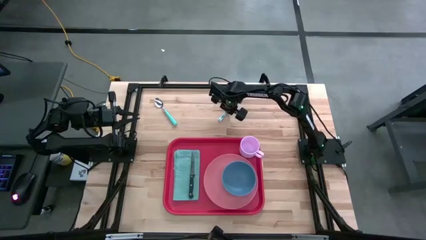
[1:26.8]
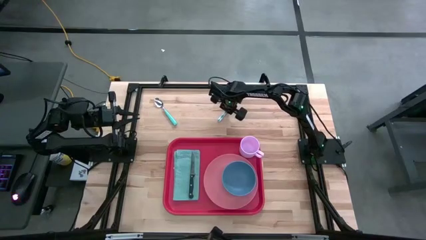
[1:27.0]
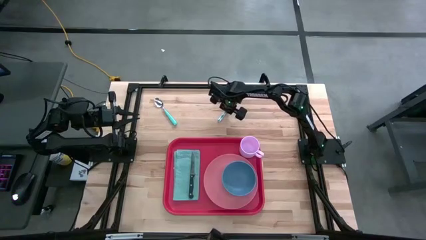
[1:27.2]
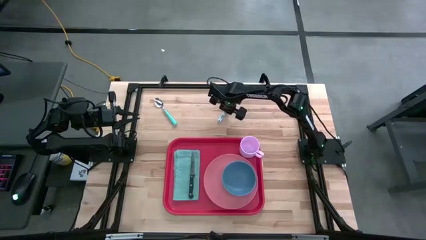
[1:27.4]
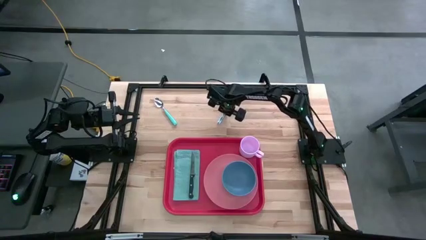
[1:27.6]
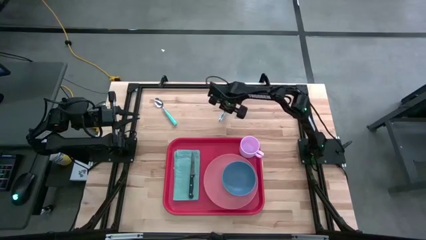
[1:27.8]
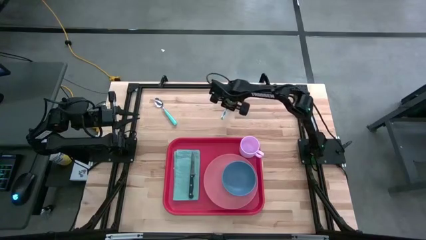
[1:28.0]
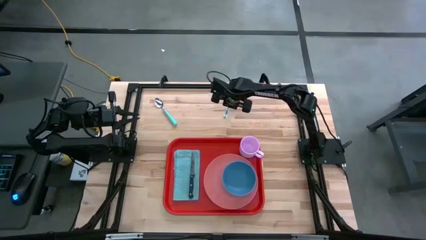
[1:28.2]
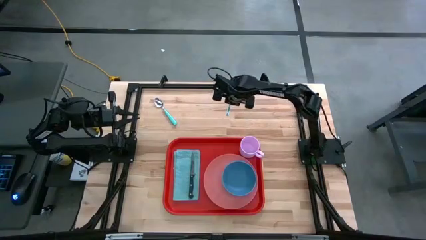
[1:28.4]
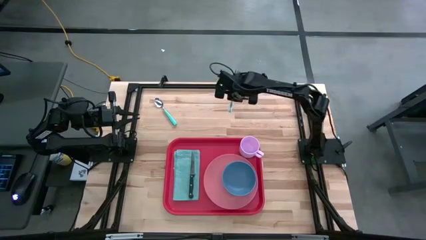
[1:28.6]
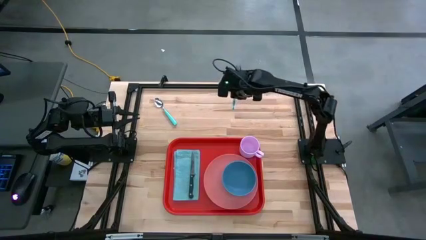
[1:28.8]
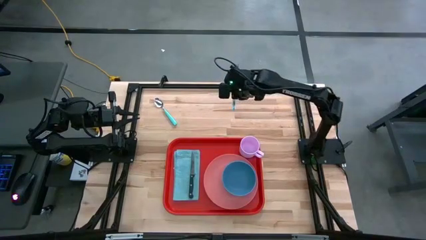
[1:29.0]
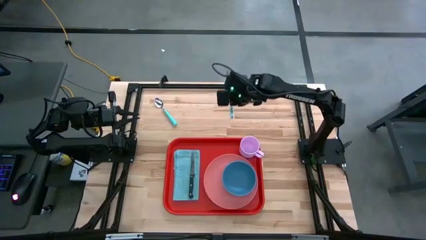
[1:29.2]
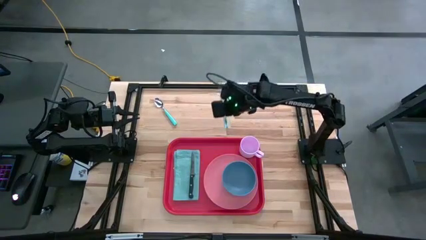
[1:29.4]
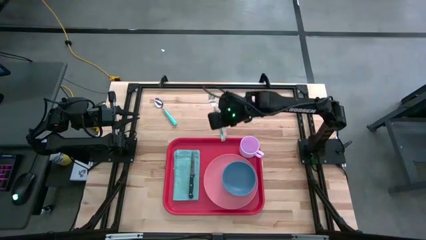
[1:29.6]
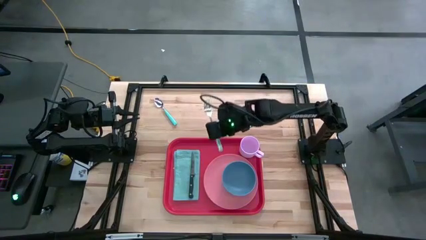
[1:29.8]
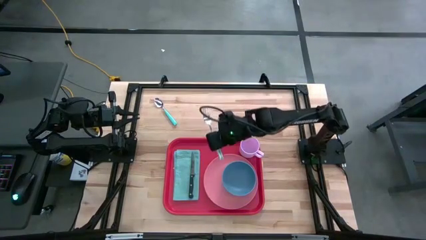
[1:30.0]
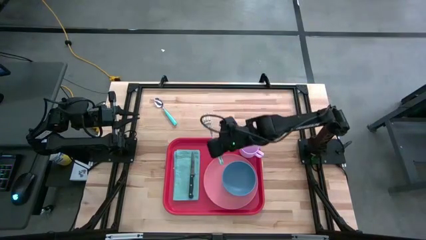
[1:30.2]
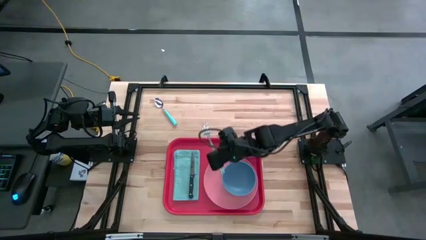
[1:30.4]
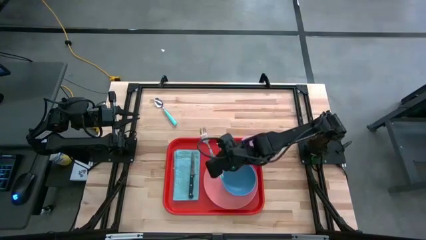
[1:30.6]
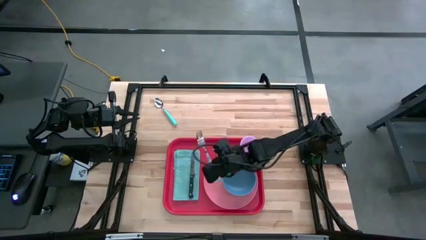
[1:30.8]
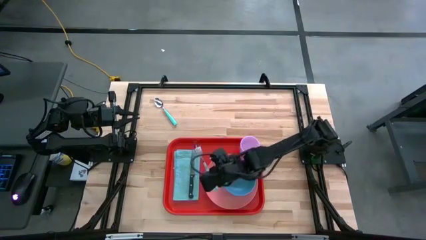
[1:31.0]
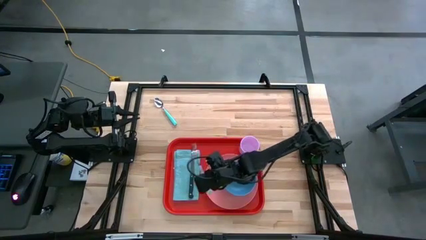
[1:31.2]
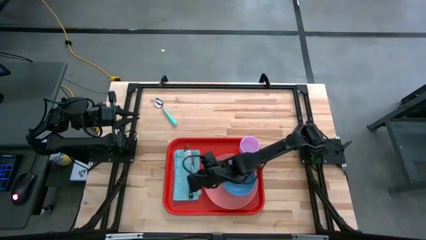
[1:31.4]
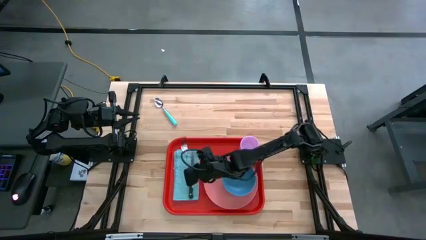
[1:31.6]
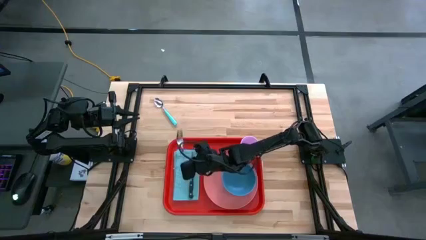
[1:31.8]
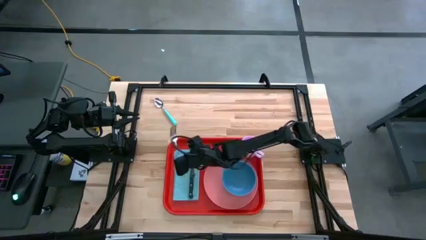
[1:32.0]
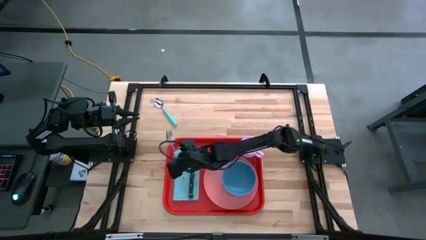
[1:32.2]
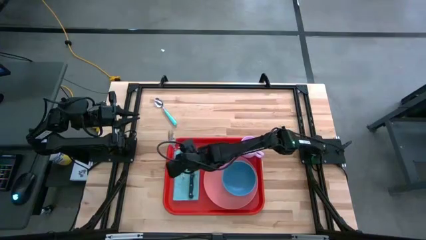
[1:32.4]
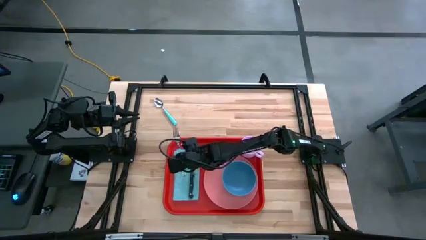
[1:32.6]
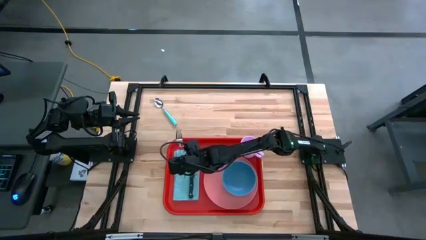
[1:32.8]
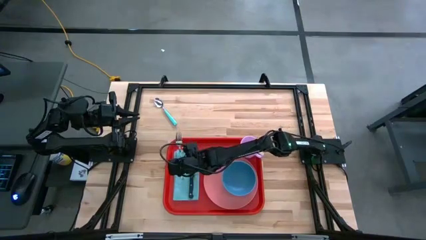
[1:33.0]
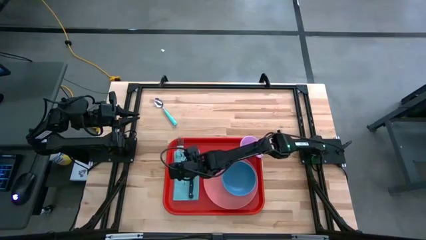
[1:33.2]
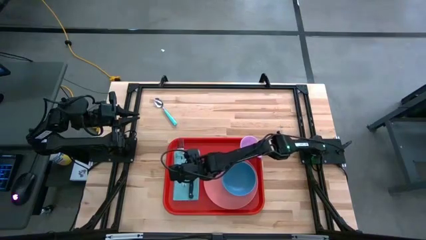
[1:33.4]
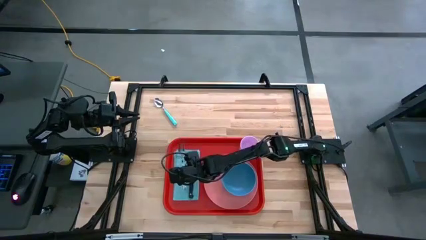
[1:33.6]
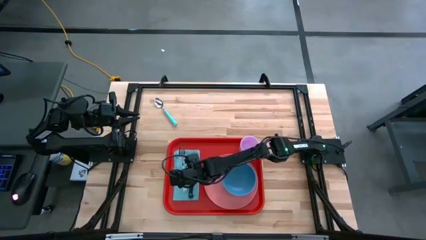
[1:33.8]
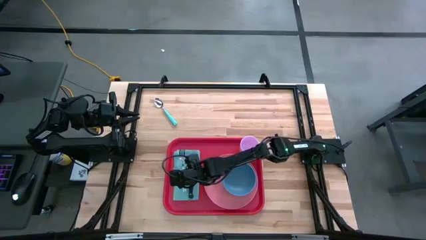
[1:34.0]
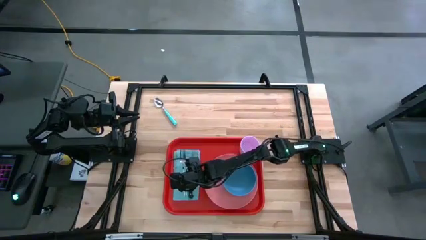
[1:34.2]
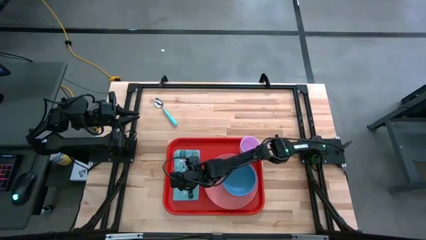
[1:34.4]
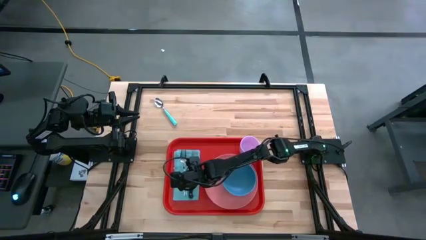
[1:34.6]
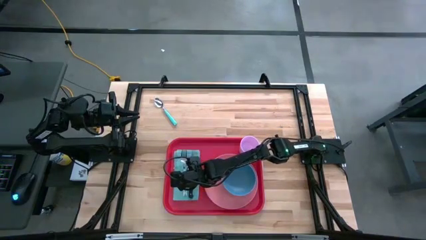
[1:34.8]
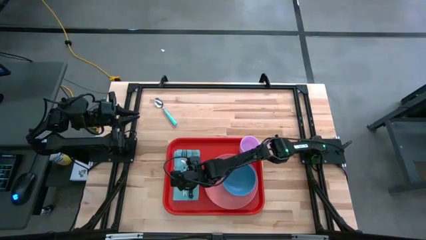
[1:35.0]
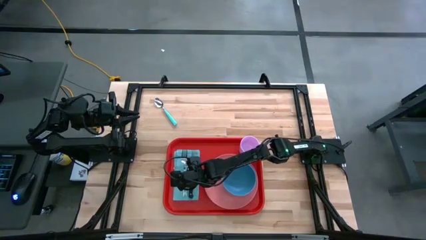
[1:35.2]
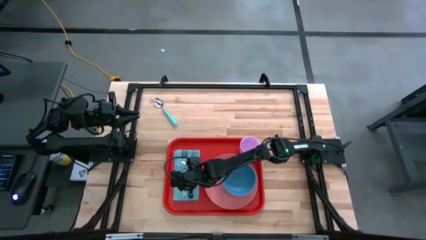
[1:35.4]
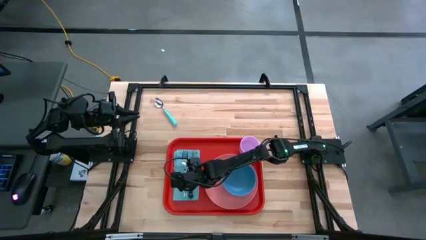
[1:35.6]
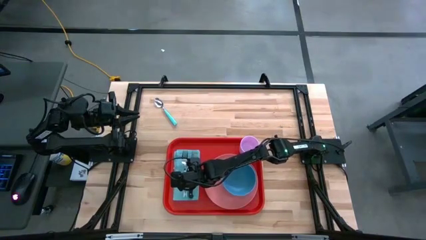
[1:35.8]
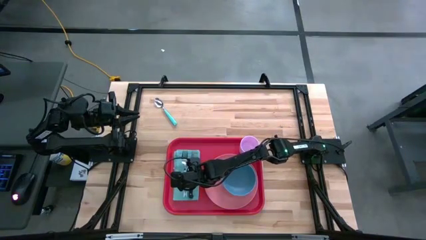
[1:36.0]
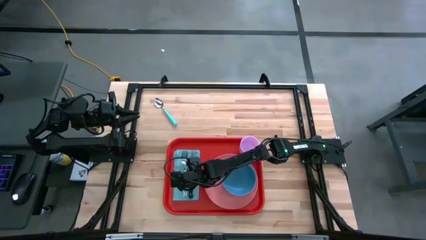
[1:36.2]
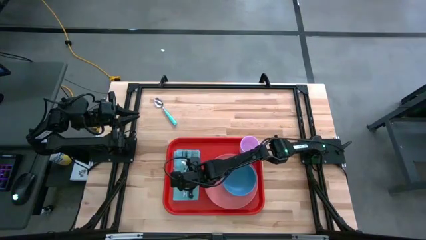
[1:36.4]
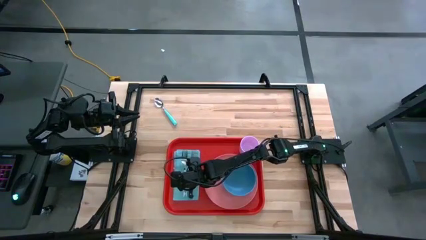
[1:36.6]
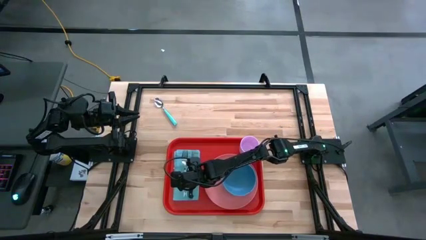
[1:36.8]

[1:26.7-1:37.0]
Task: Set up tray
Put the blue fork on the blue napkin to the left of the black knife
